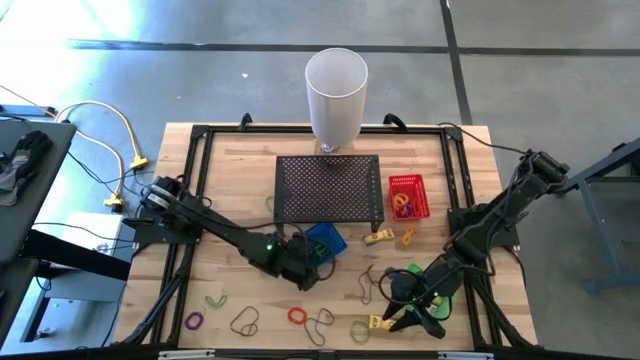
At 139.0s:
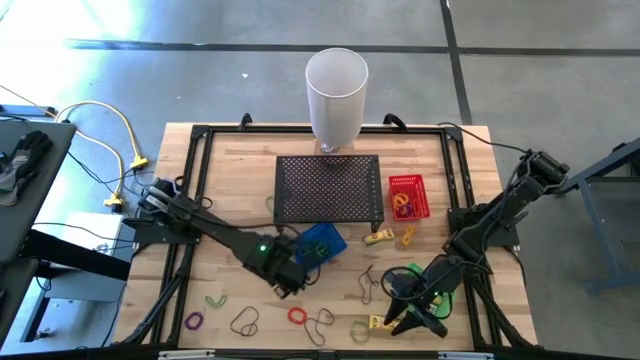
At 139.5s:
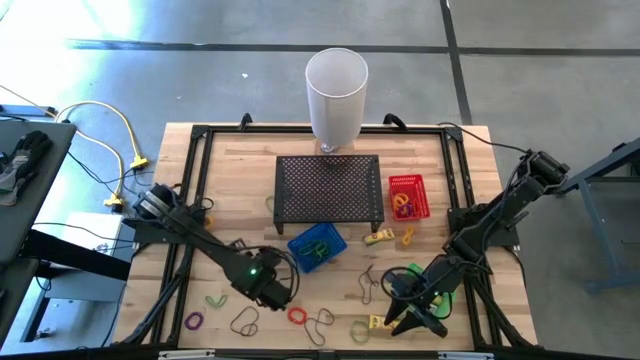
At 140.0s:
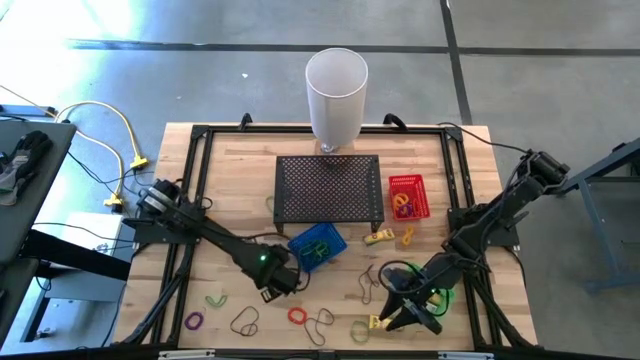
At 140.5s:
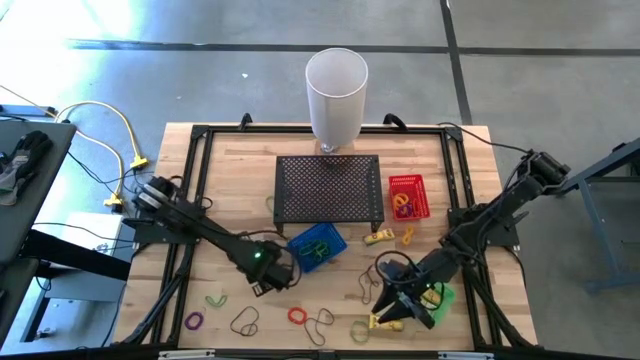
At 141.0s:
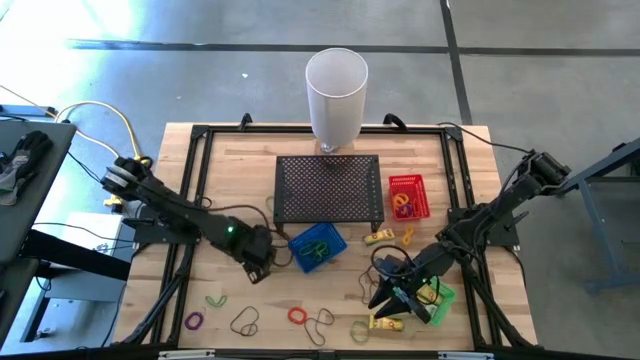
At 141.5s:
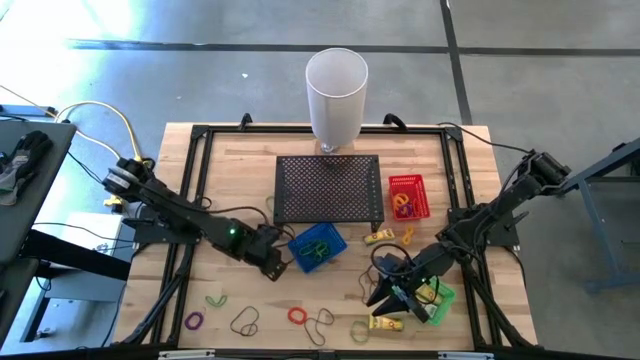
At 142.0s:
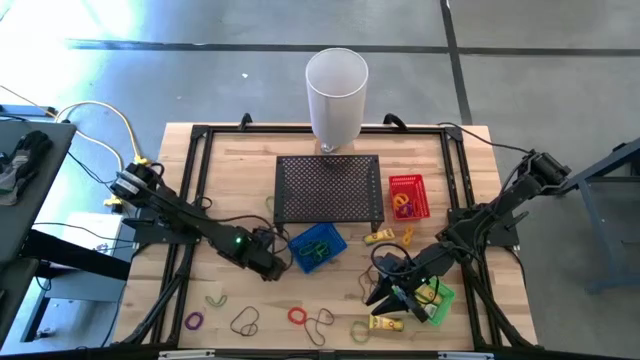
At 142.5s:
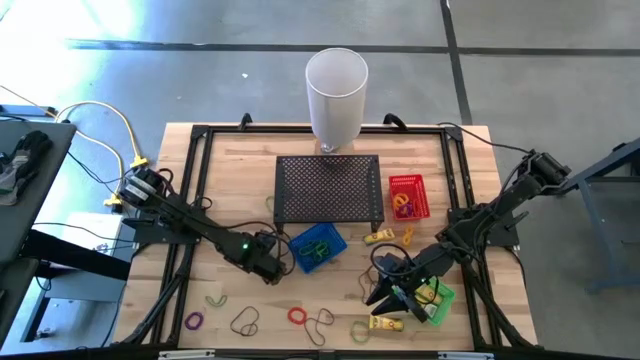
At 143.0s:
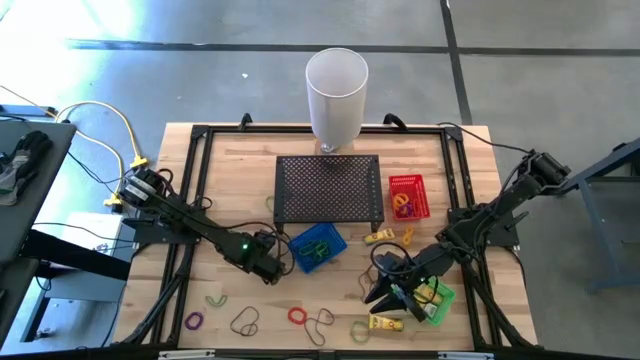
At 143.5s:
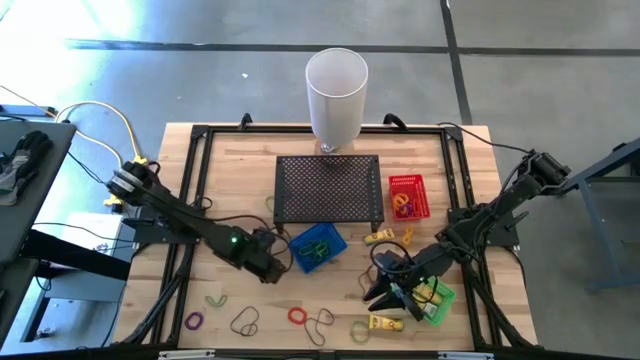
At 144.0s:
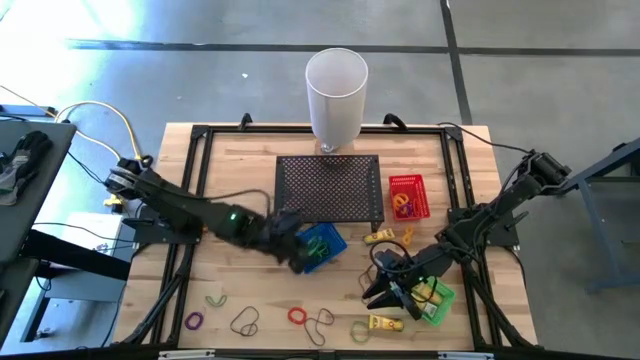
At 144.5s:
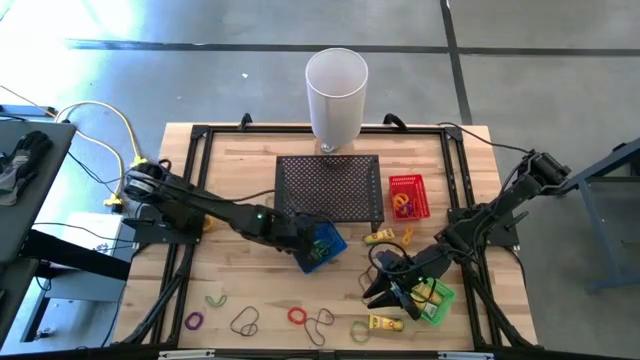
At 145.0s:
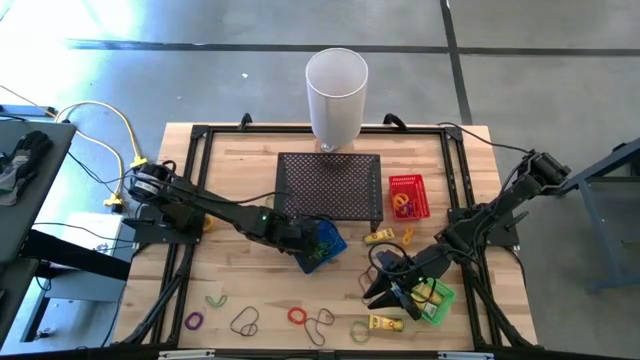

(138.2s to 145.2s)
Task: Pick & Place Office Desk Supplies
Put the green rubber band into the blue bin

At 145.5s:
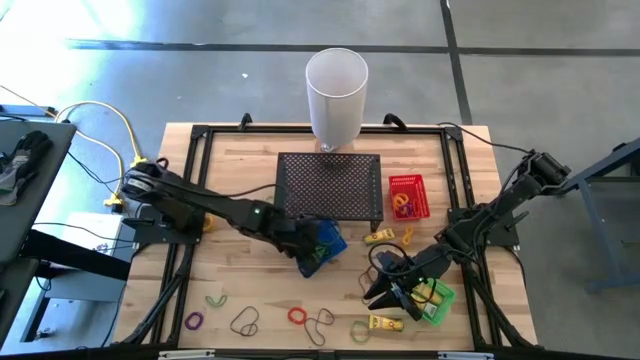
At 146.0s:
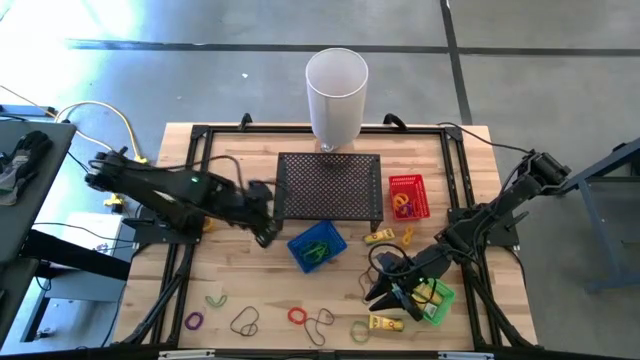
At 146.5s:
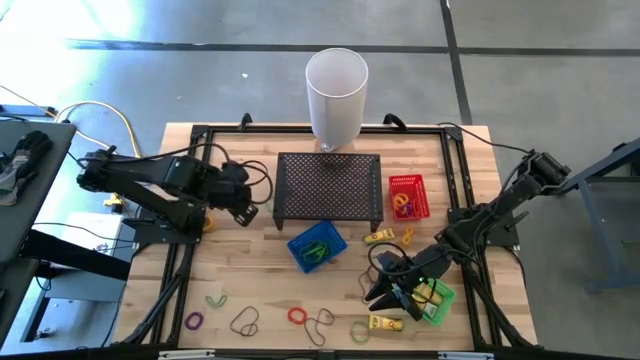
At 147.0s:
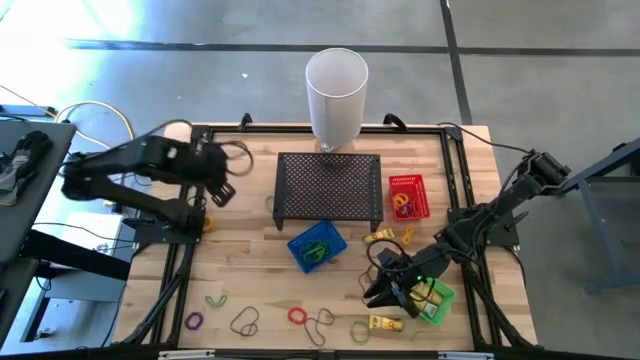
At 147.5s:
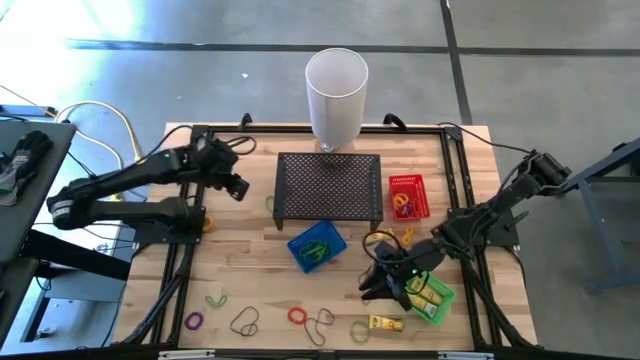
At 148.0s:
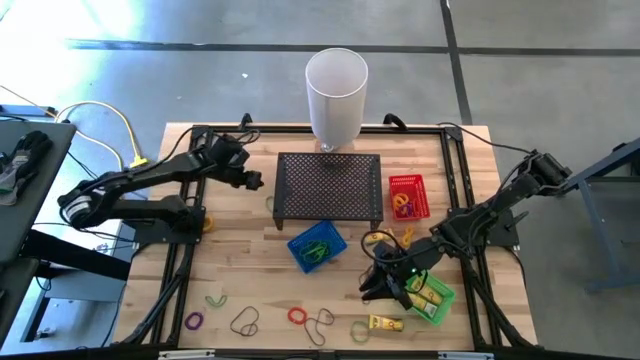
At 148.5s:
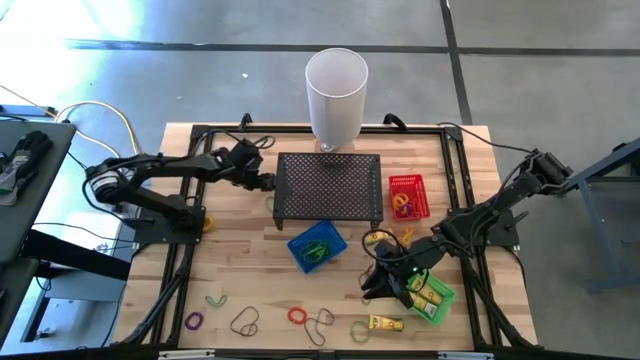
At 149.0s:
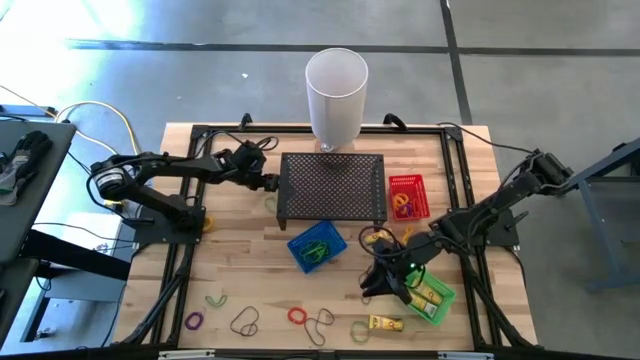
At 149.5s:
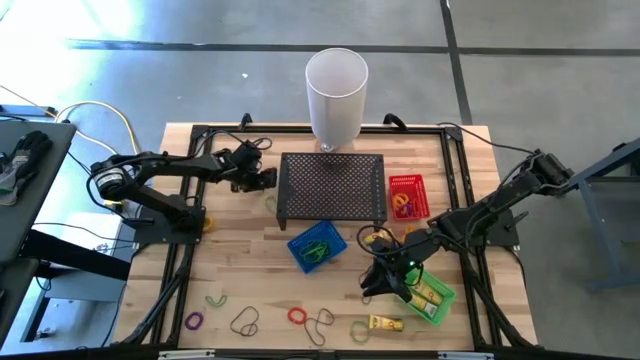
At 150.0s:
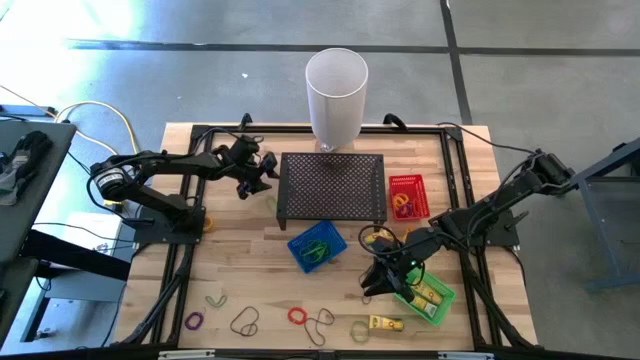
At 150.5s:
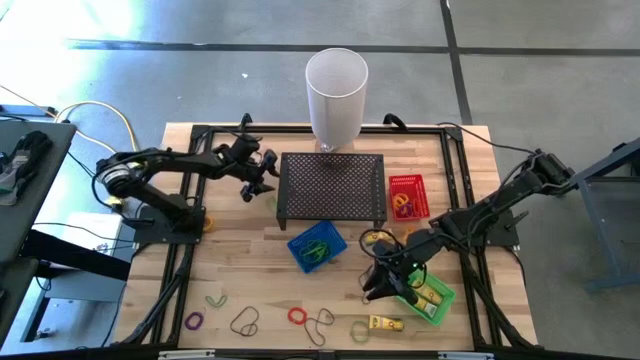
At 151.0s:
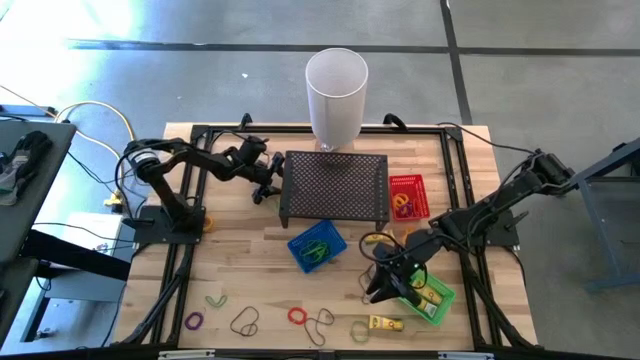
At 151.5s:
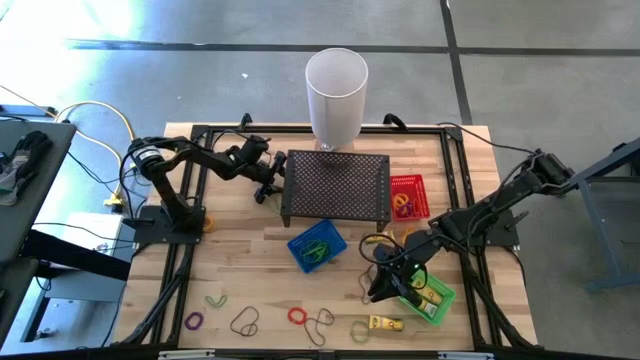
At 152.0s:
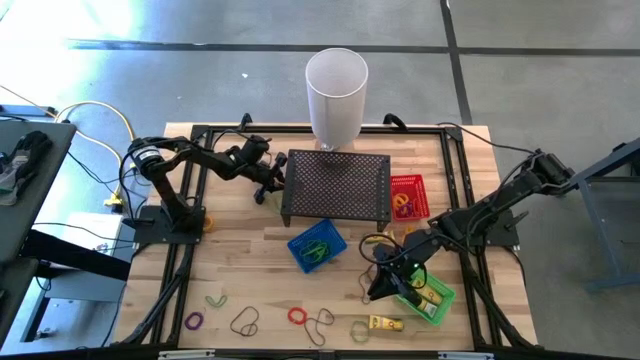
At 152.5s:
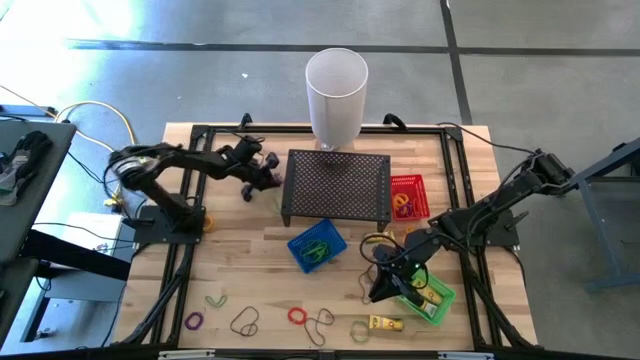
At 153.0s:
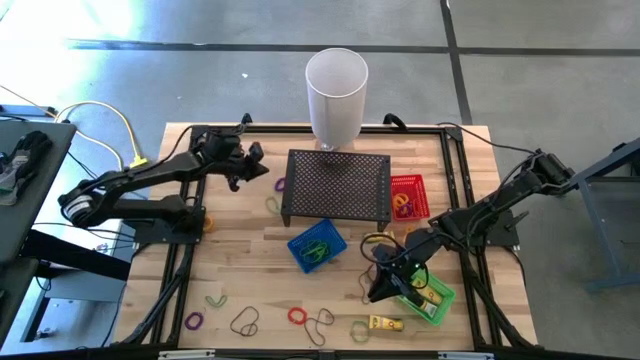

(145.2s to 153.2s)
Put the violet spring keychain into the red bin

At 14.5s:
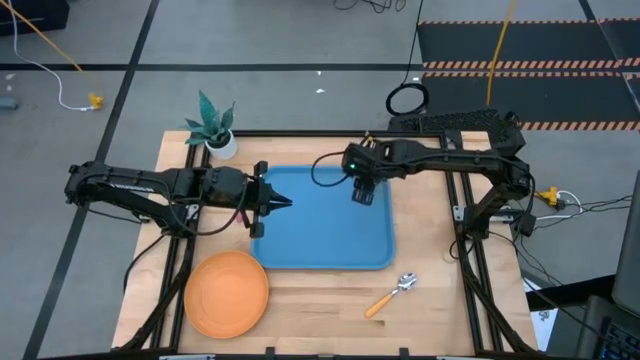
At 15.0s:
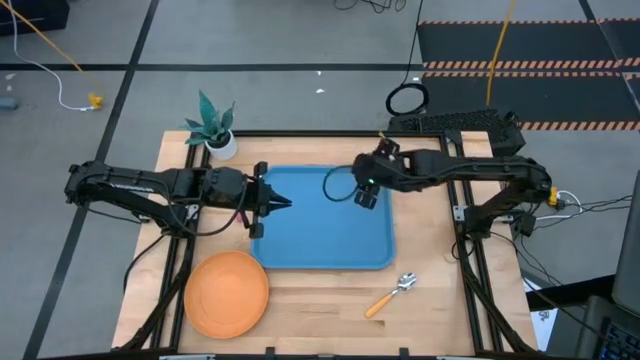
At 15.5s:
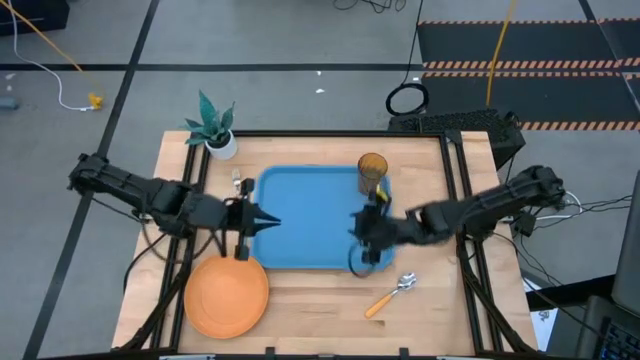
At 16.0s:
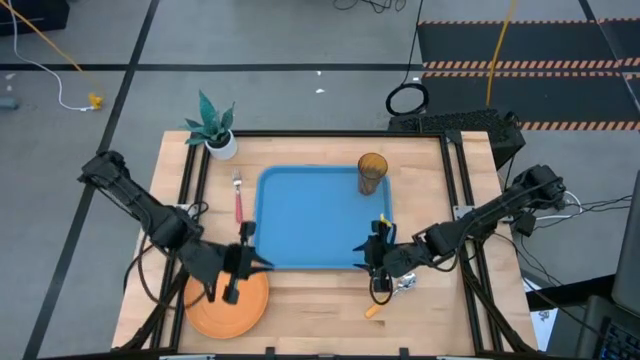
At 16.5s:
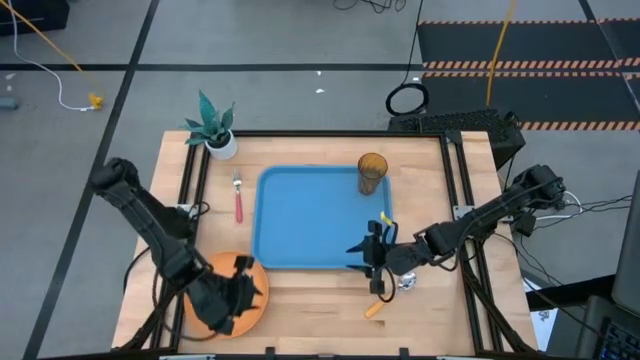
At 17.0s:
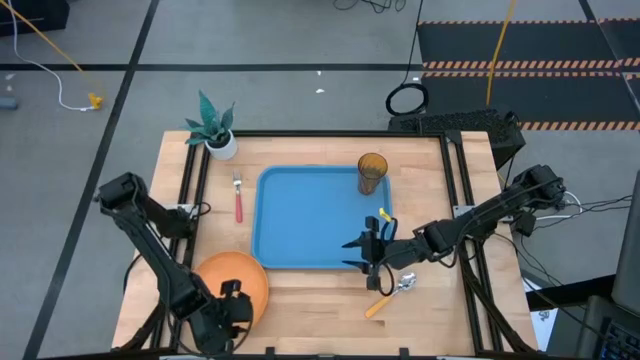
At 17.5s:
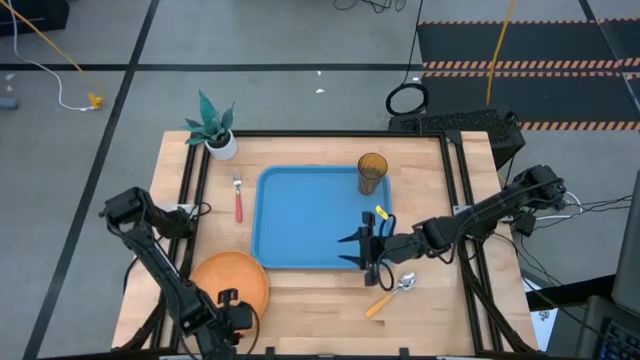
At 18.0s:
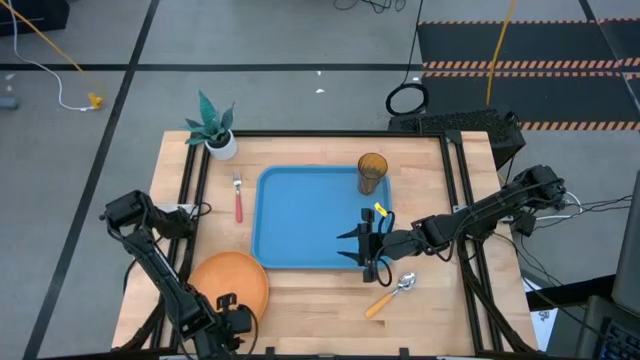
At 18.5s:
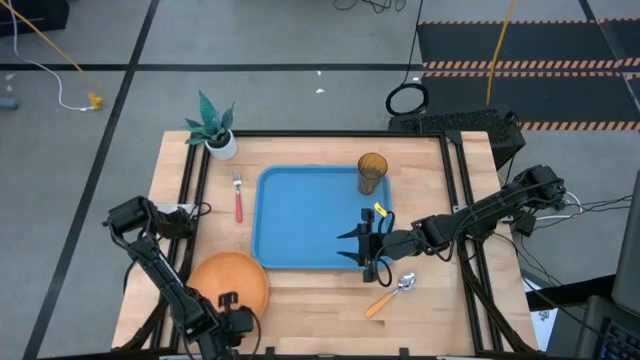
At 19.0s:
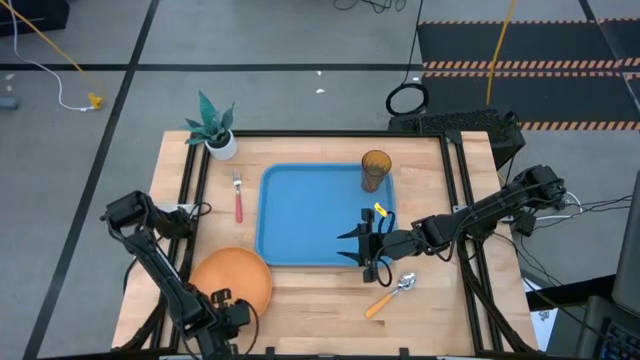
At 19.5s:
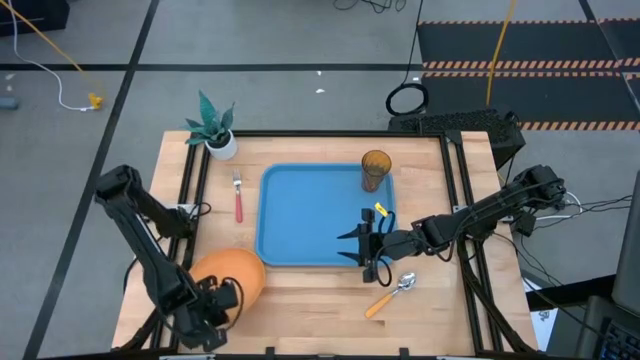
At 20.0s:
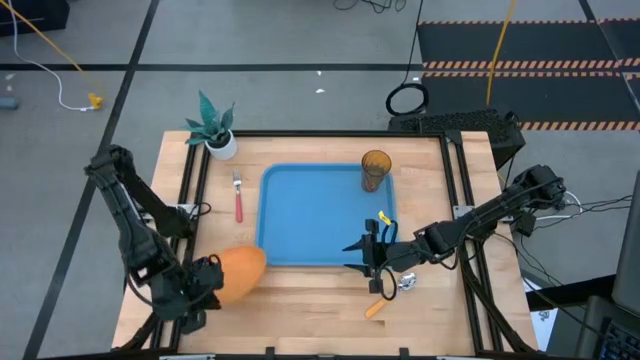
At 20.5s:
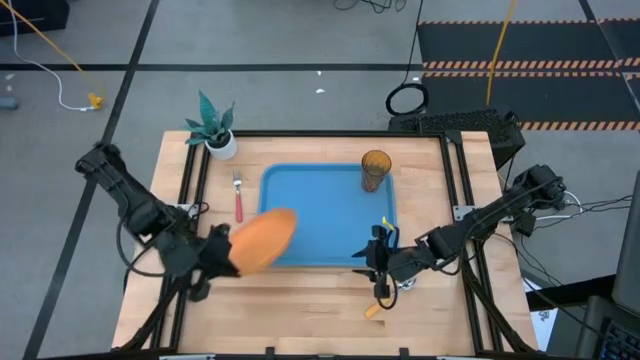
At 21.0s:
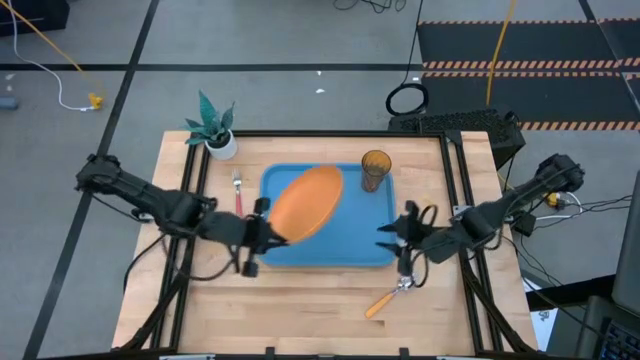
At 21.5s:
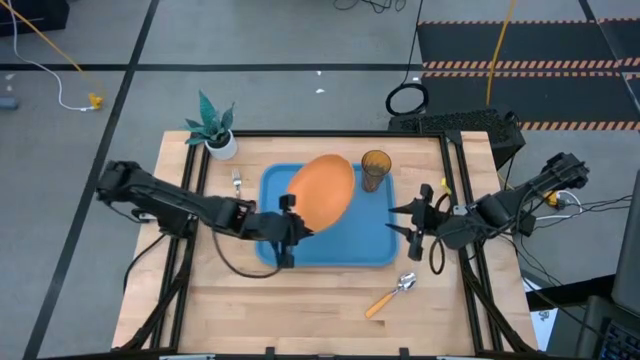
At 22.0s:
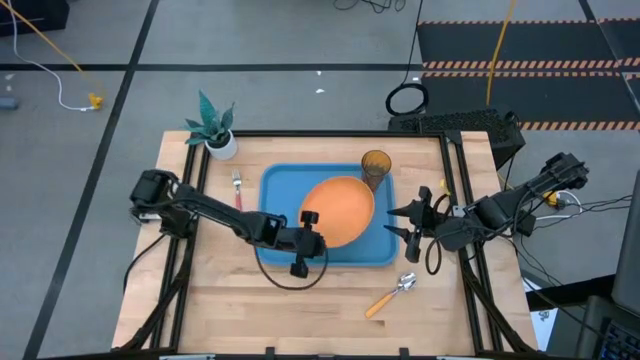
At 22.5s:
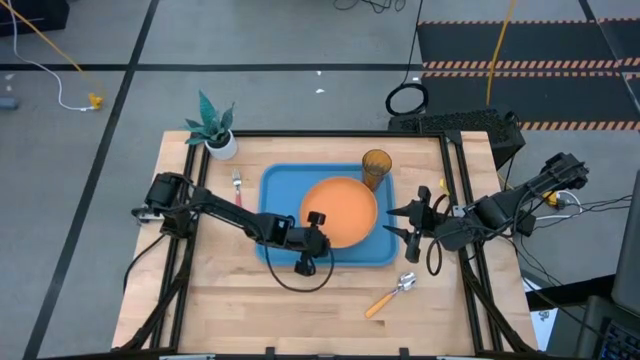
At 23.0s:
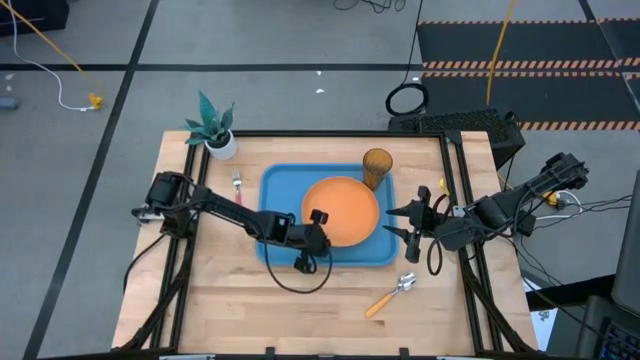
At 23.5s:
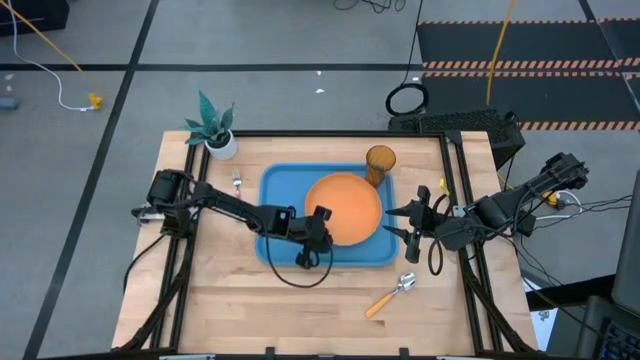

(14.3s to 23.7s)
Task: Pick and place plate/cup/fork/spoon on tray
Put the orange plate on the blue tray to the bottom left of the brown cup
